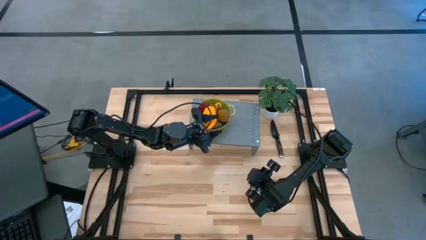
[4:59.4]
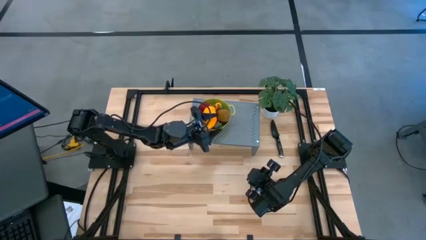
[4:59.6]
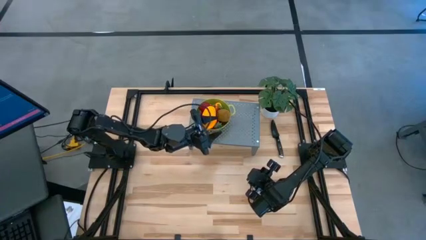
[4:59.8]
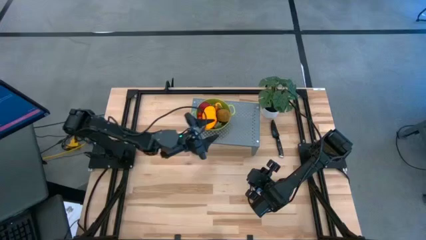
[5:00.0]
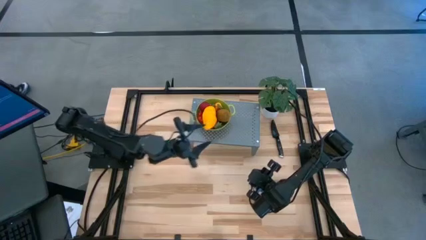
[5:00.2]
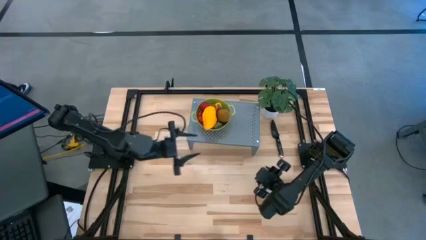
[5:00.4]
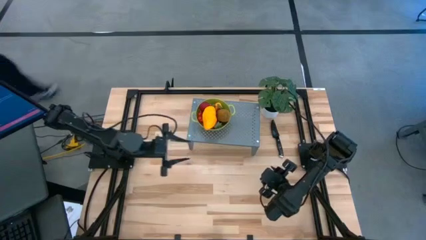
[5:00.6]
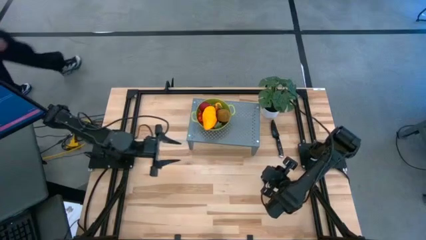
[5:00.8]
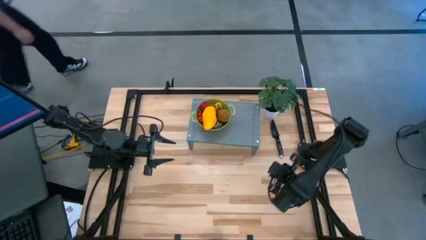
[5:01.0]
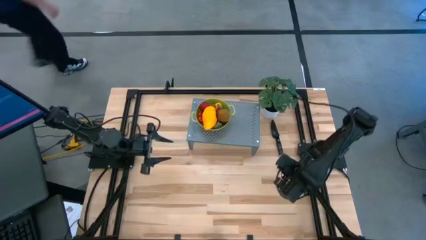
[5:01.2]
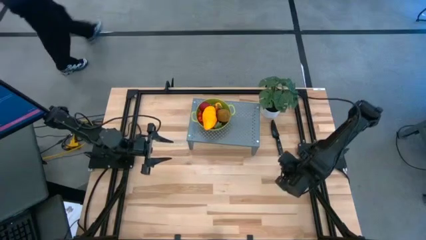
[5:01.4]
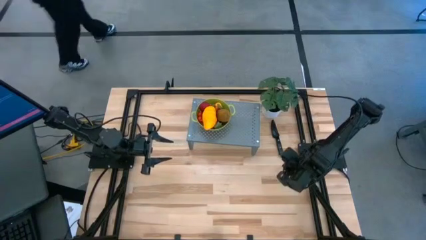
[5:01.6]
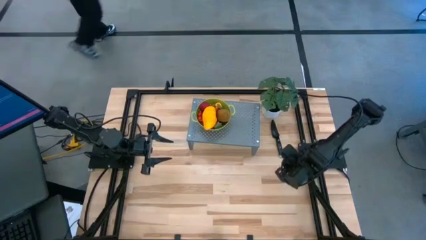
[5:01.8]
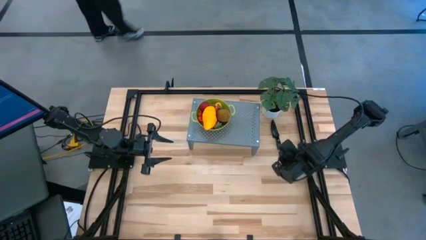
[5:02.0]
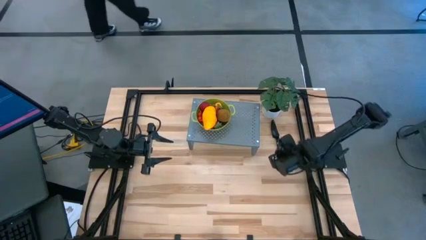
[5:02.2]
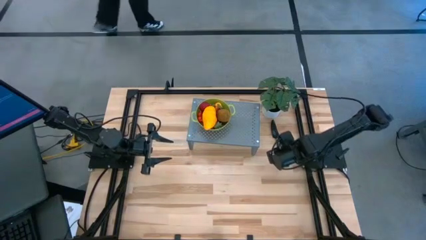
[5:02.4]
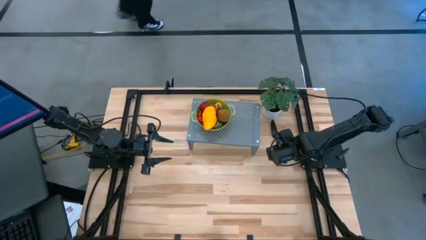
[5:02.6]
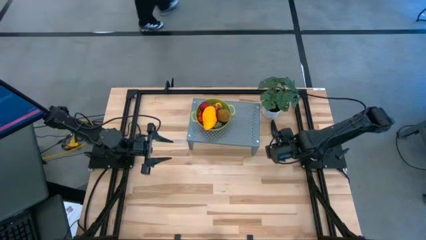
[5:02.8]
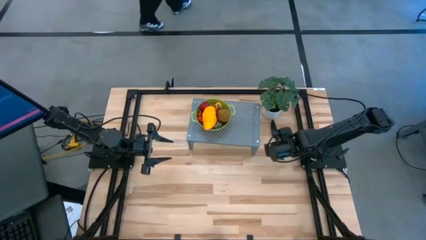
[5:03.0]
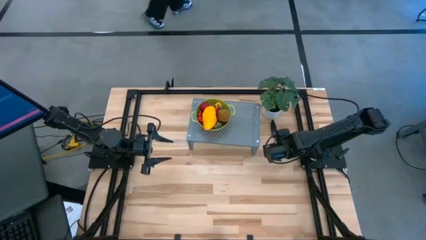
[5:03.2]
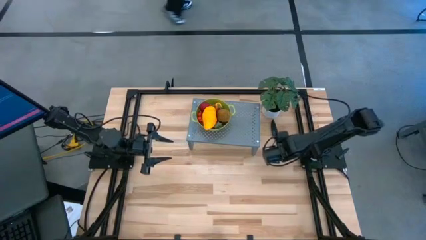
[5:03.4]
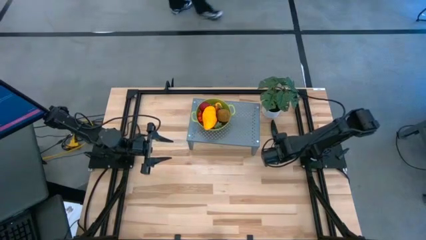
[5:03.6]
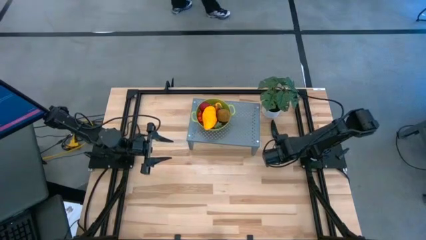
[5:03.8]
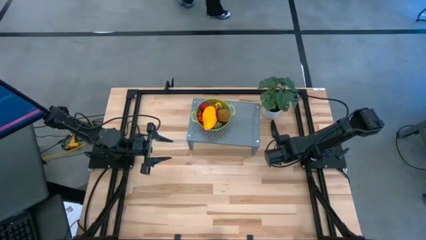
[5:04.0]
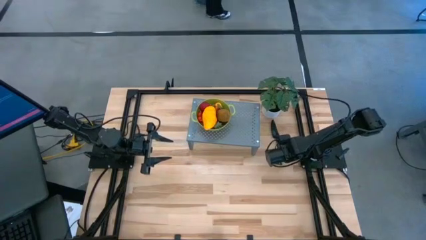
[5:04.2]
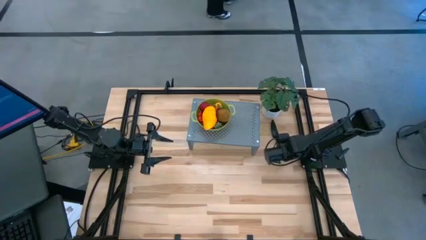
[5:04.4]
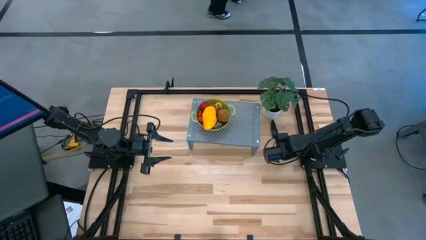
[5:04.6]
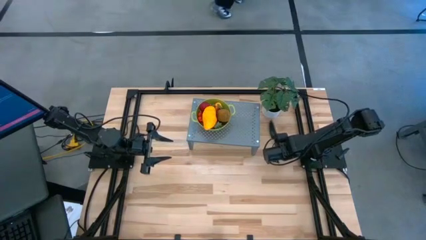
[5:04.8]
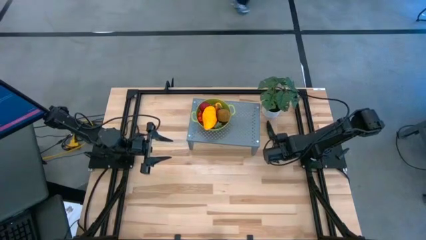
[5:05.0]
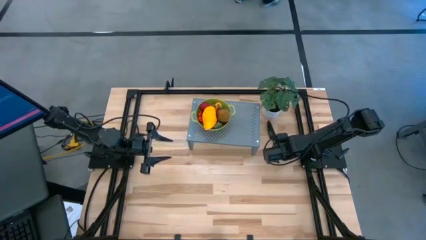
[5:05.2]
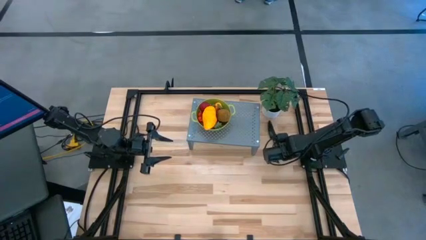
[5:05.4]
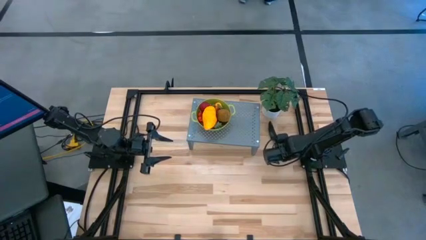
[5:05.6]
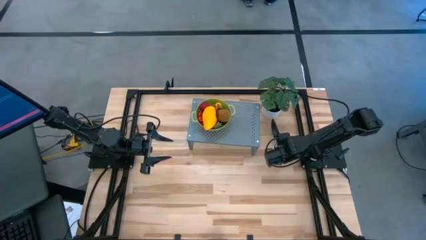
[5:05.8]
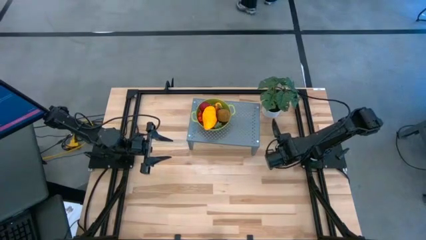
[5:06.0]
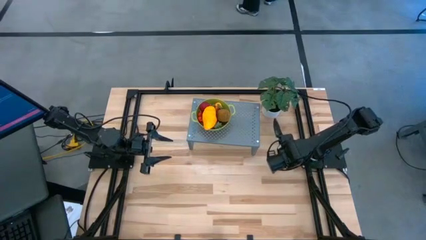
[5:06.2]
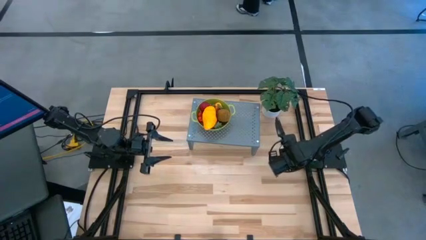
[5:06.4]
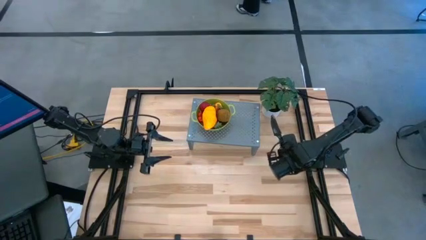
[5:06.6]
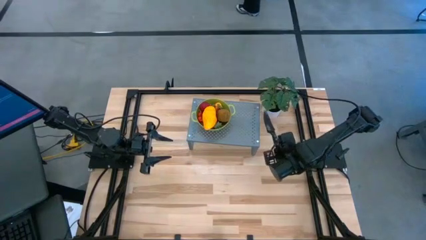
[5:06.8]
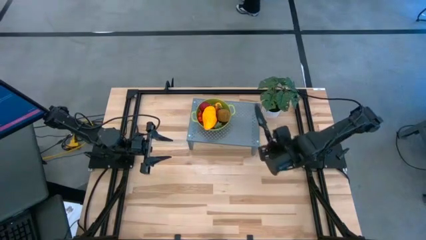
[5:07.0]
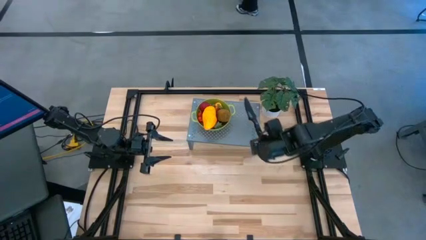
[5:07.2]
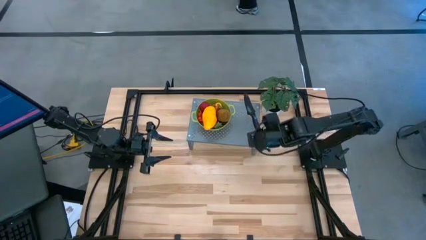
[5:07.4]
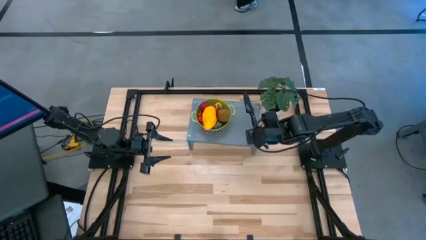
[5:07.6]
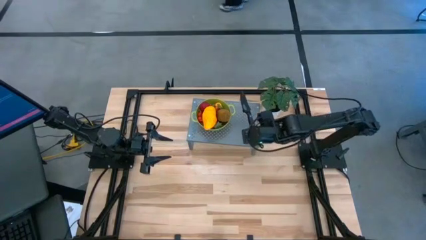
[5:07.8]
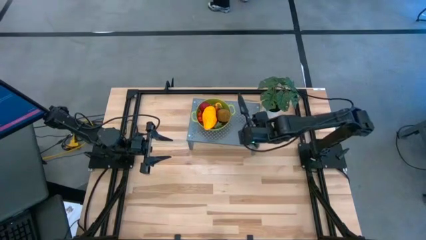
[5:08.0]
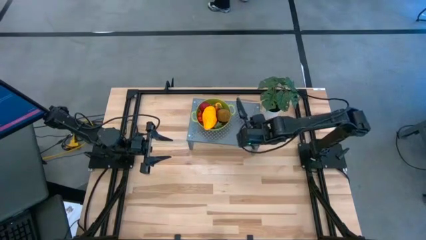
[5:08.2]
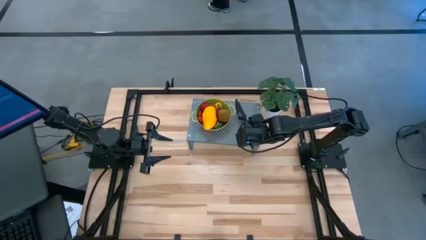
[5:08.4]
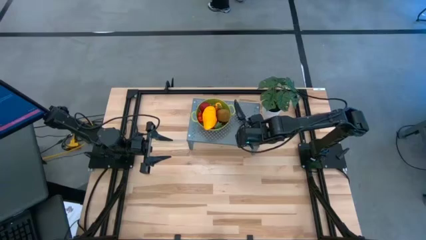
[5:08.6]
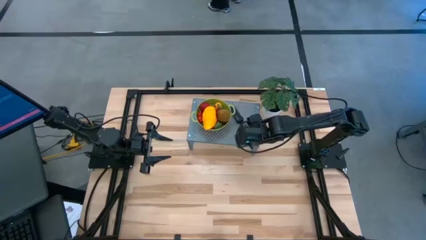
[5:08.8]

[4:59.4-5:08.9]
Task: Pick & Place Fruit
Put the knife on the shelf

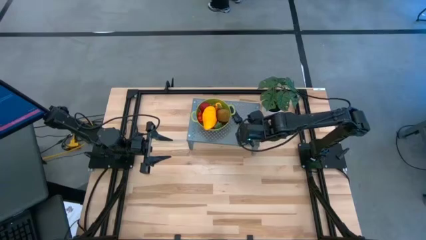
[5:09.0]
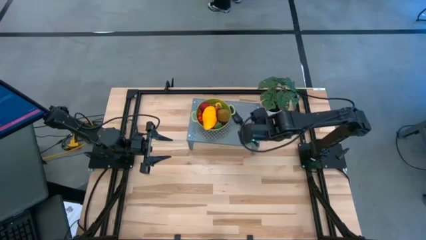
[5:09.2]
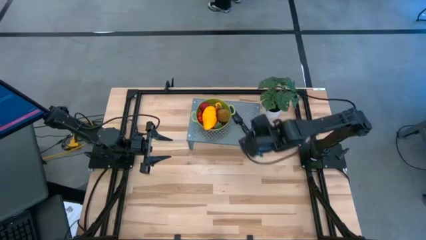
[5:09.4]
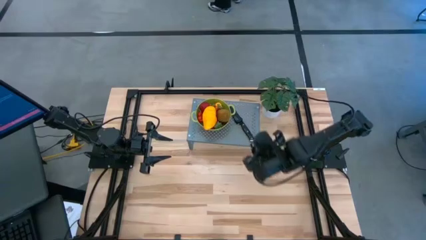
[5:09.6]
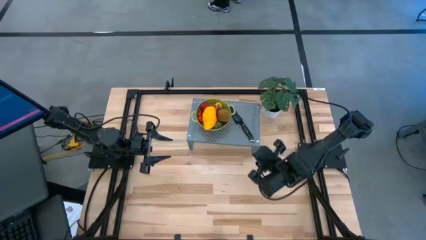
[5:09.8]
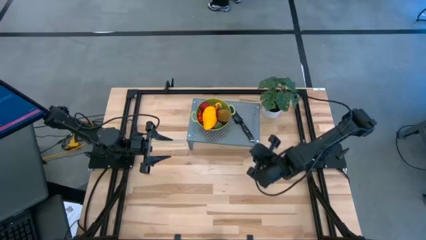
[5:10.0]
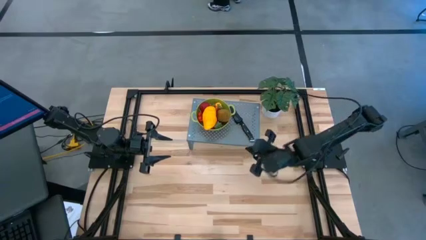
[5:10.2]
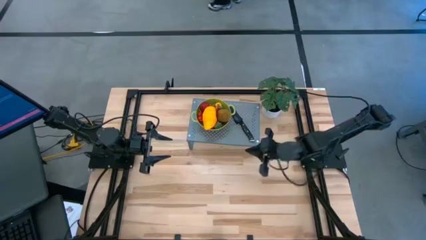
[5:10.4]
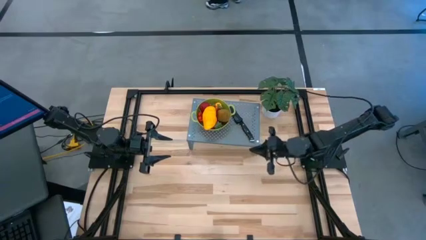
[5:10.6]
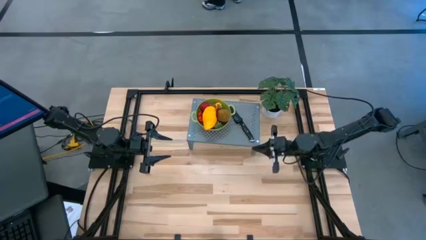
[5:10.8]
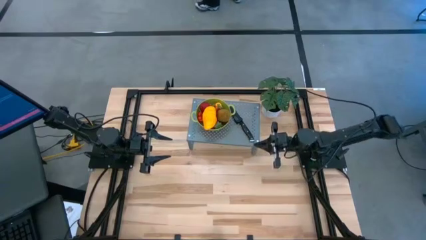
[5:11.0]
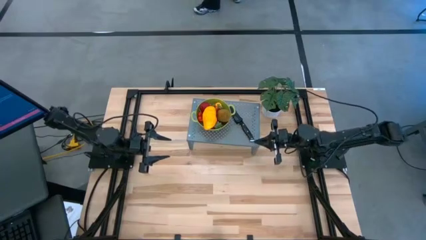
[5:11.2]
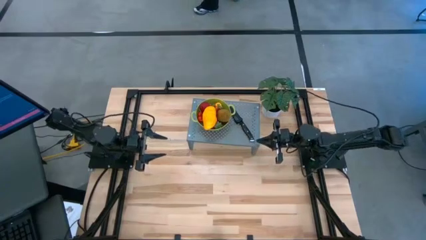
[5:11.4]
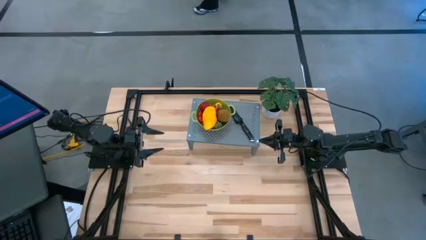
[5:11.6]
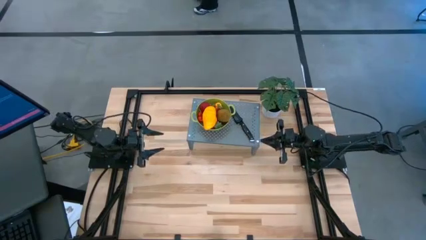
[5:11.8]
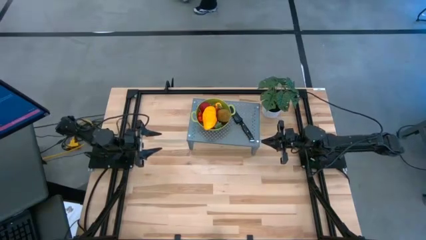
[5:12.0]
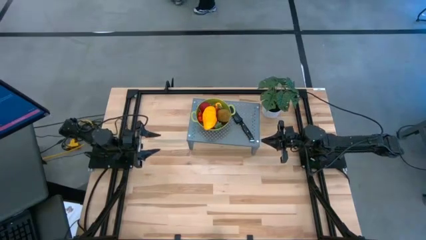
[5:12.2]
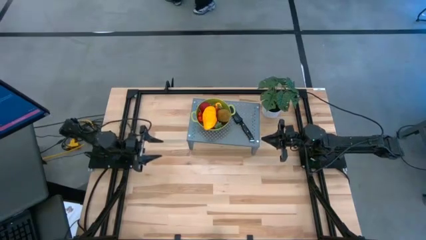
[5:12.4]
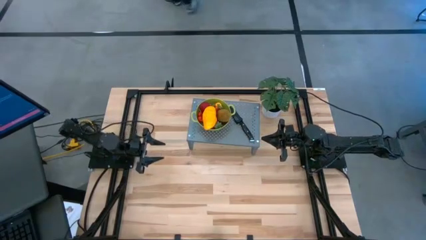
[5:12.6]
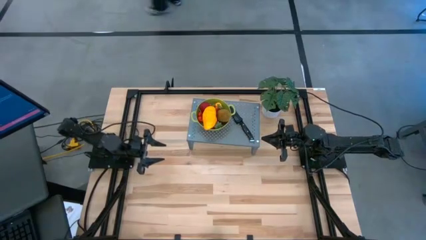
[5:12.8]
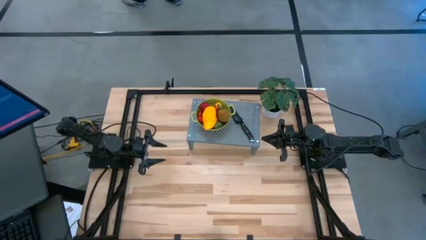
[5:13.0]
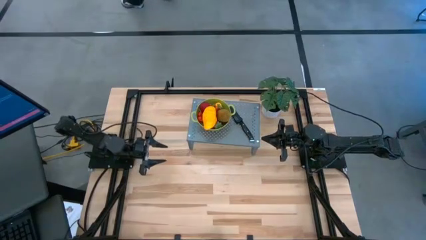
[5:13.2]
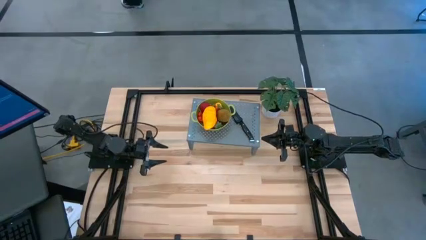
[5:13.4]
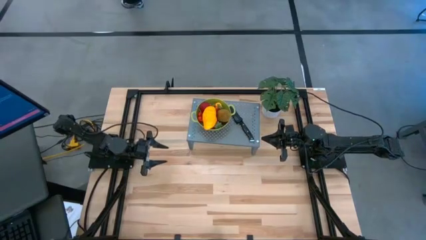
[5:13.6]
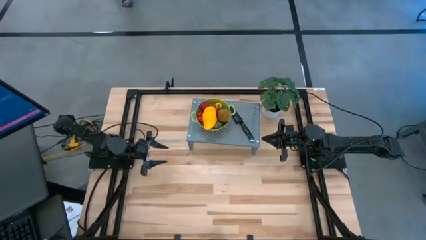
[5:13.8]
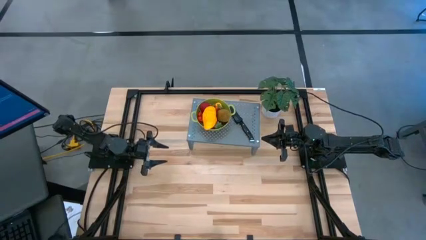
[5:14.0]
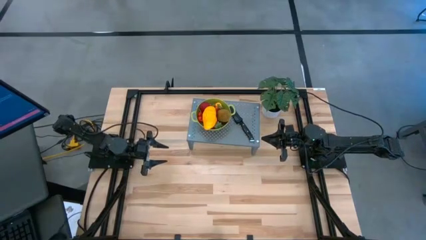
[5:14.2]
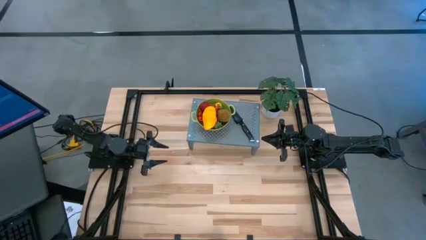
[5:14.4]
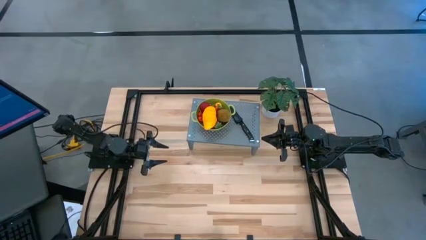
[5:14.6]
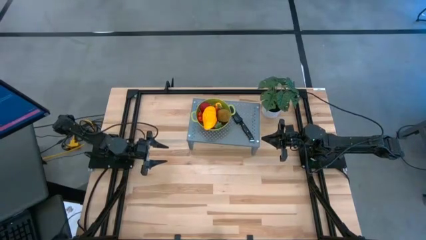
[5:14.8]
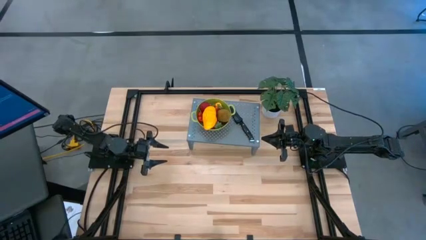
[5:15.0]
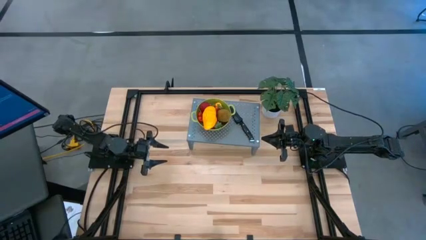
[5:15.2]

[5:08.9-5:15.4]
Return to Home Position
